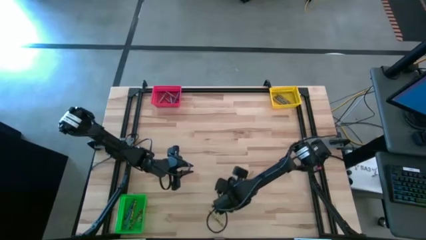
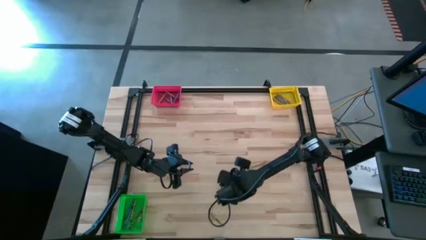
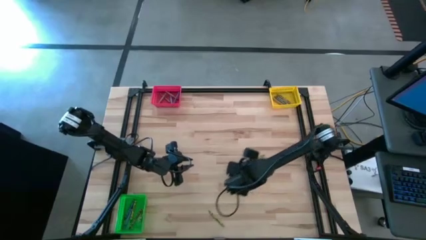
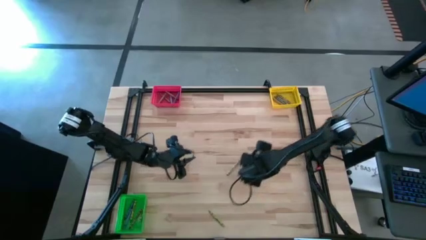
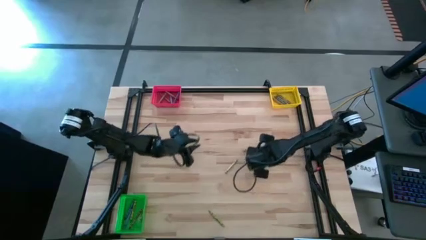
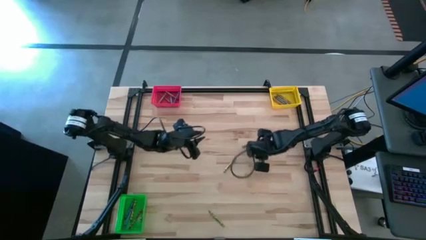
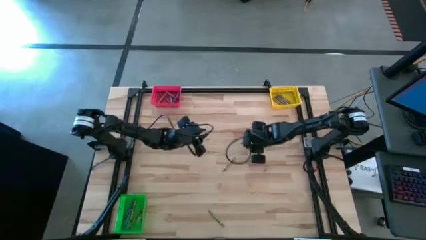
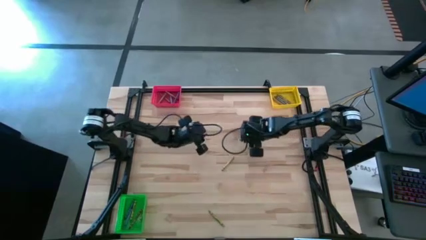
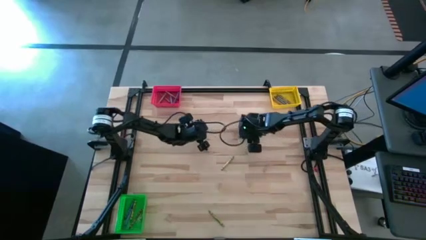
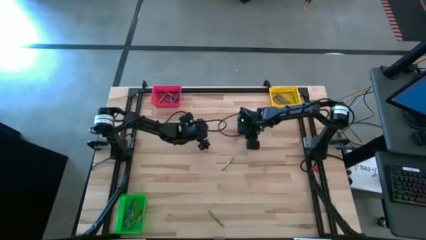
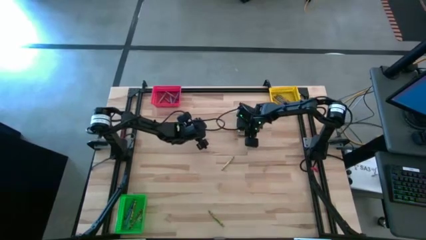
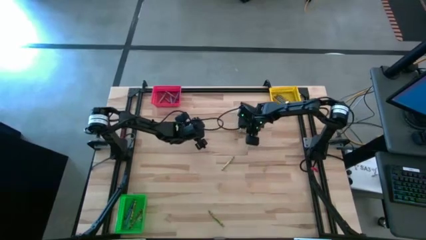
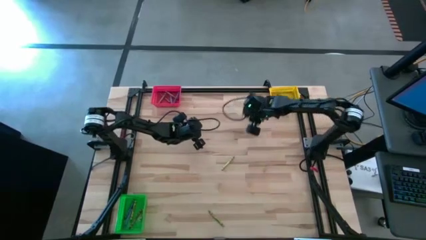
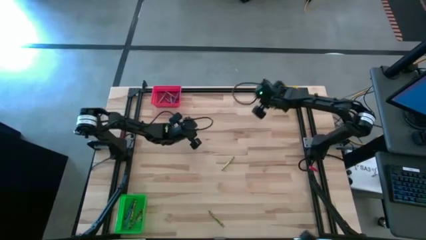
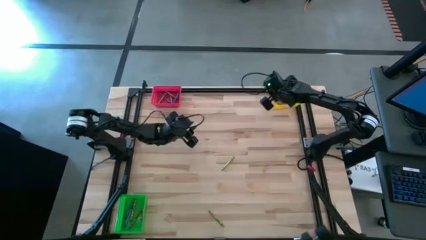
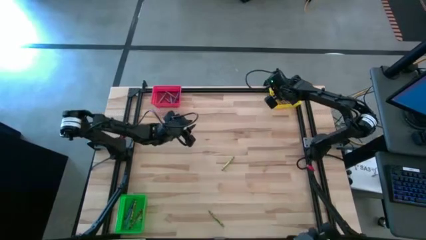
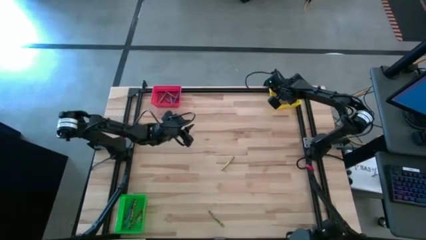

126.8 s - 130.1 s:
Task: Sort crayons
Put the green crayon into the yellow bin

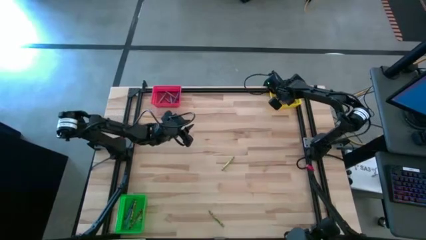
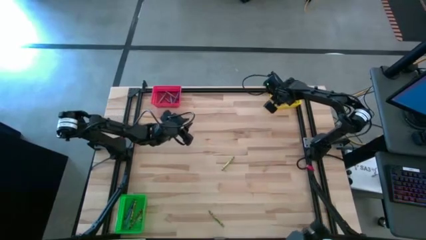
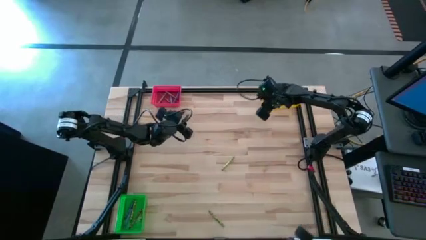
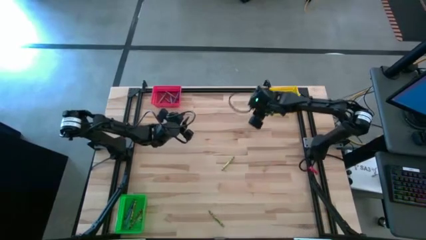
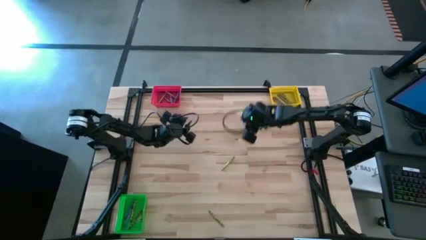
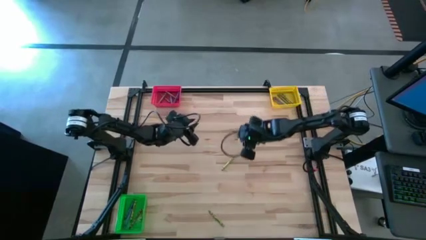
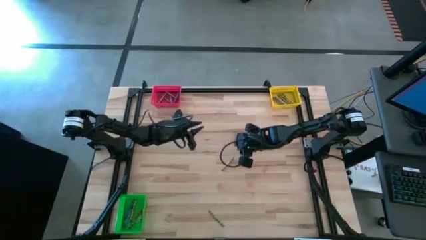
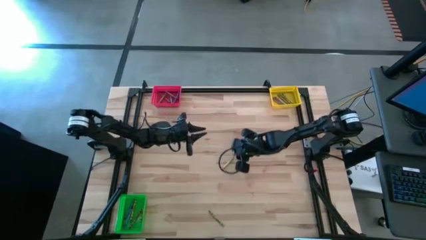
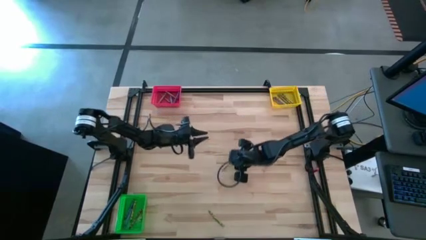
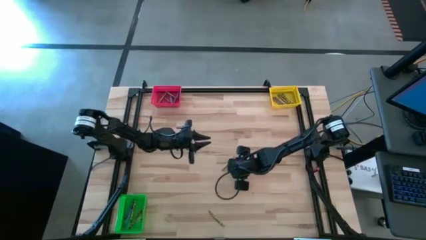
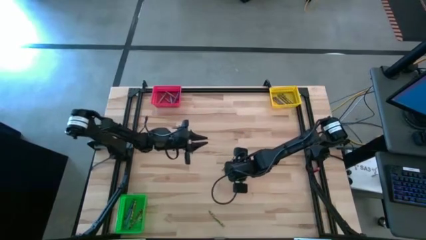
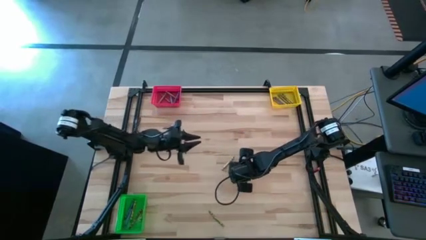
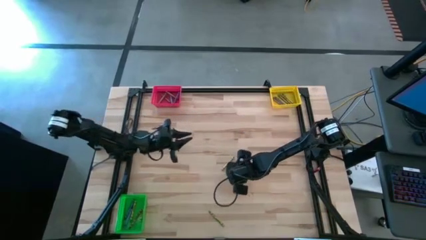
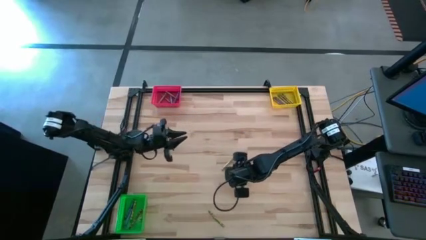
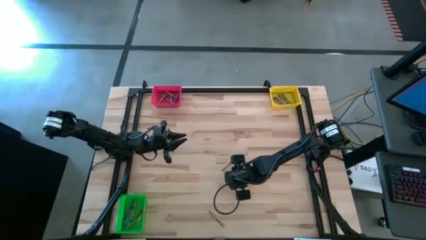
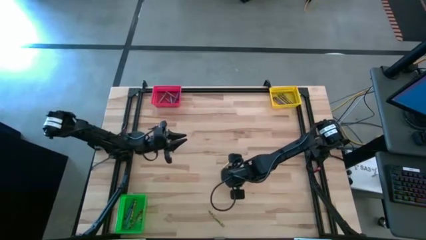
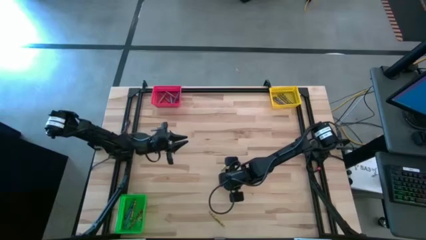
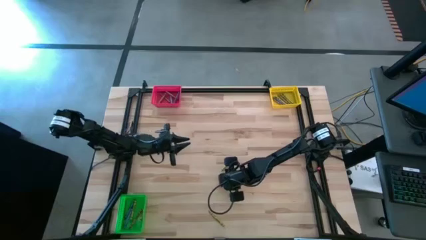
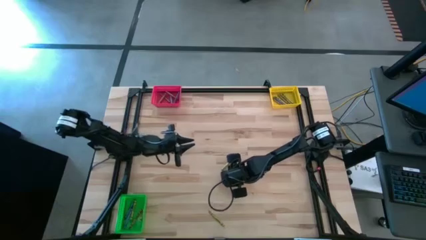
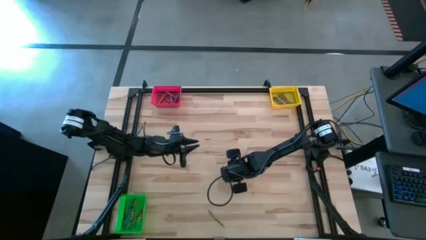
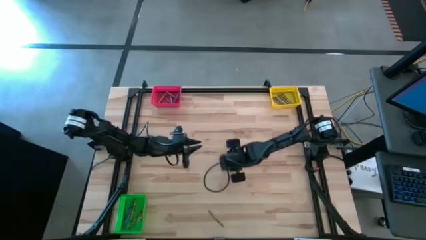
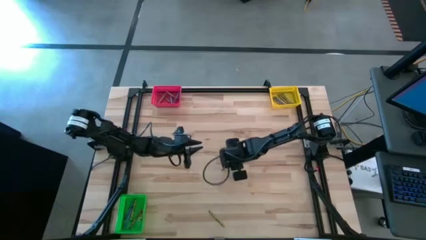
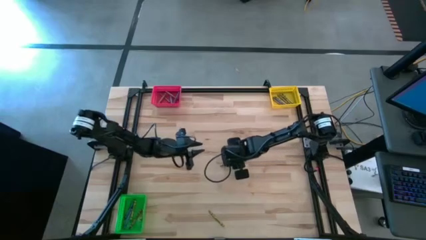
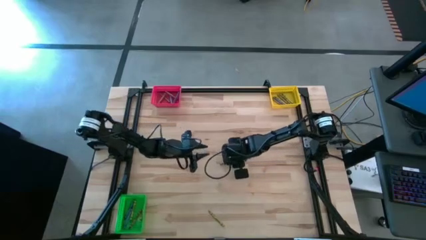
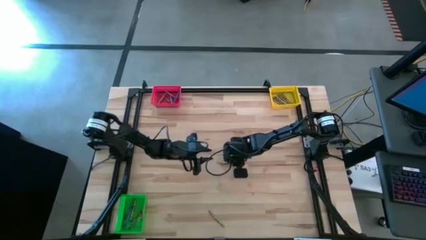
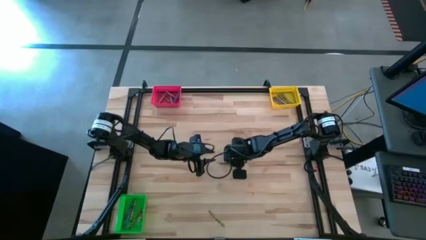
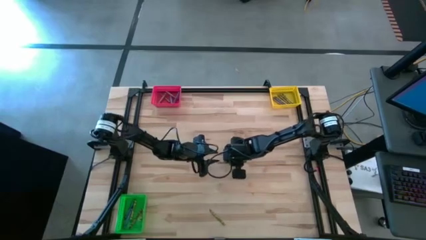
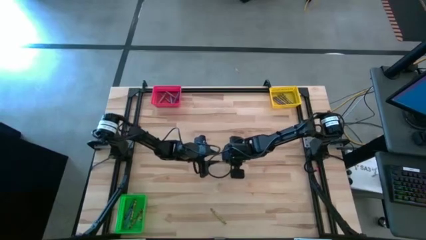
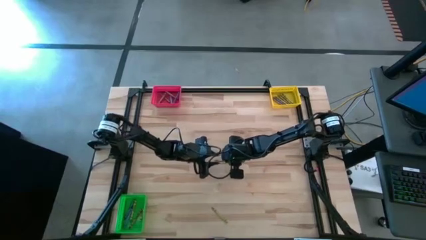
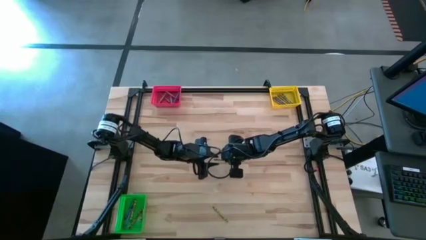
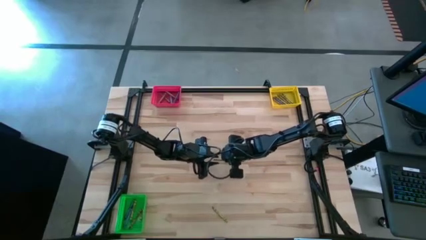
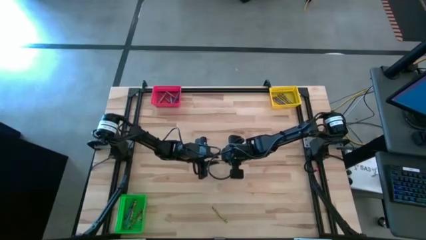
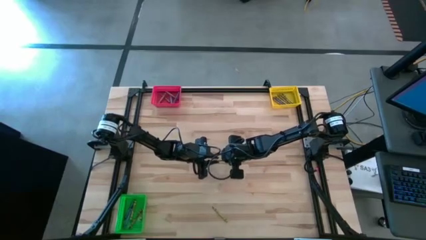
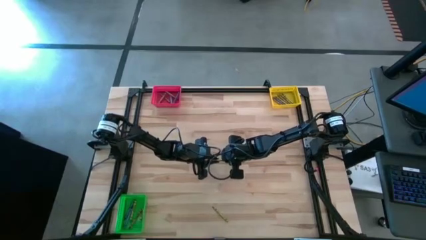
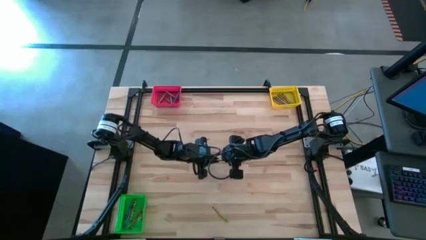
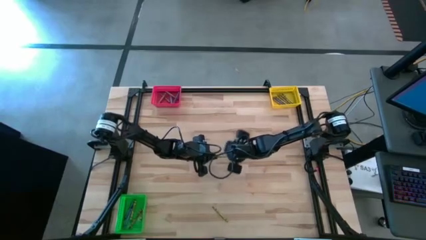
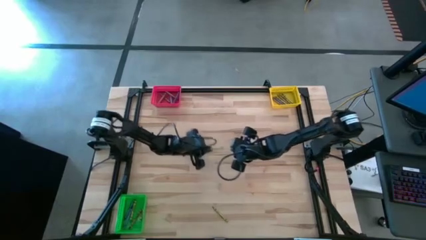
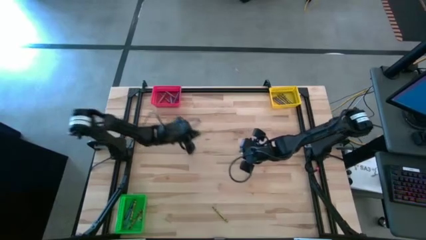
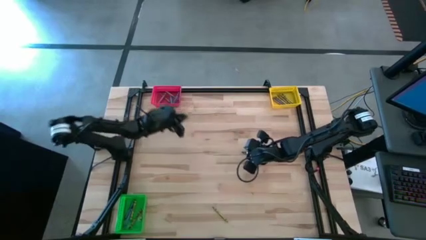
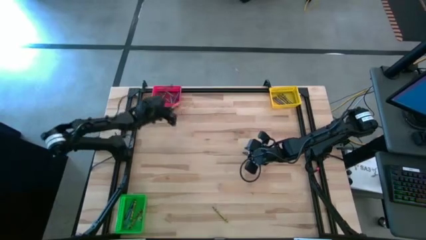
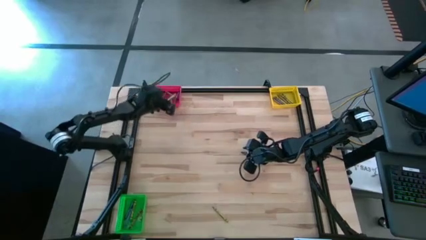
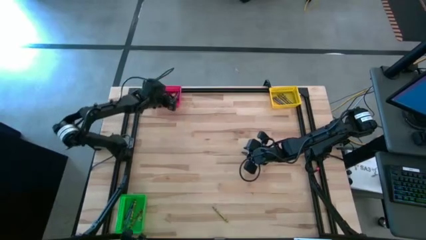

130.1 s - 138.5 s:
Put the green crayon into the red bin

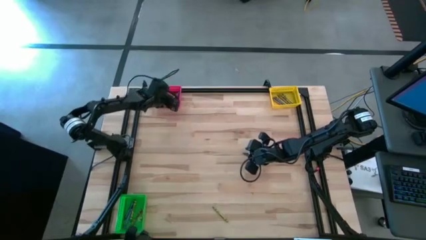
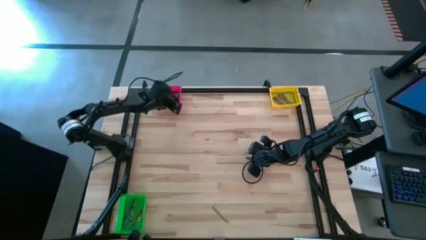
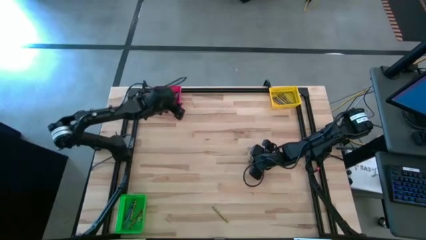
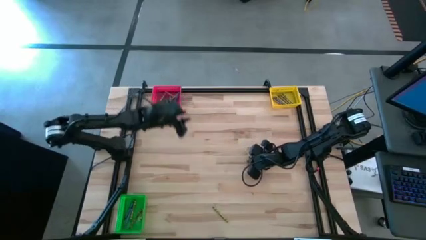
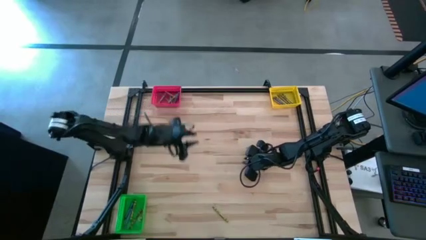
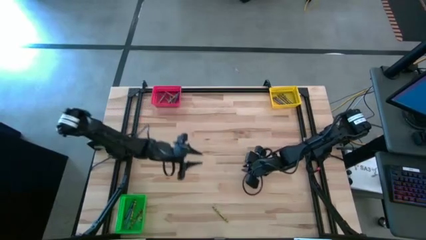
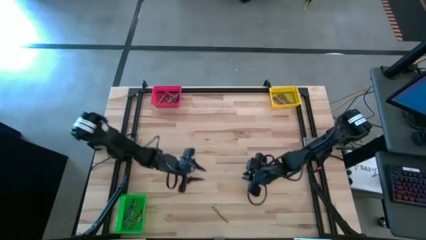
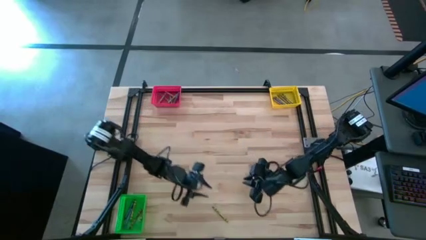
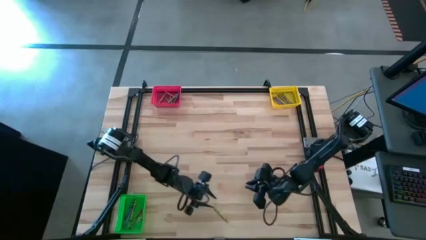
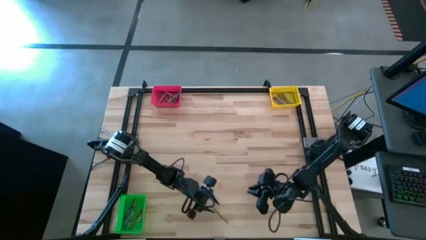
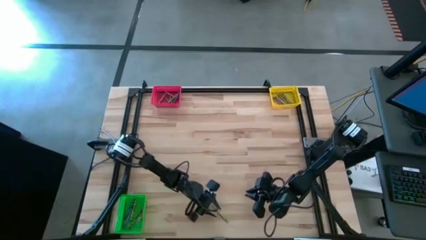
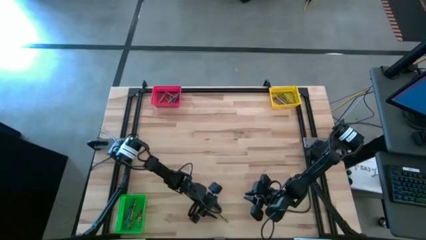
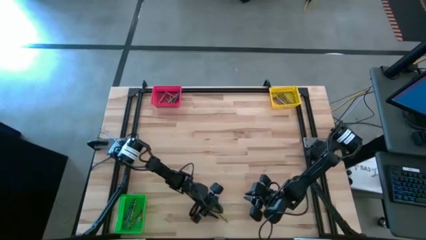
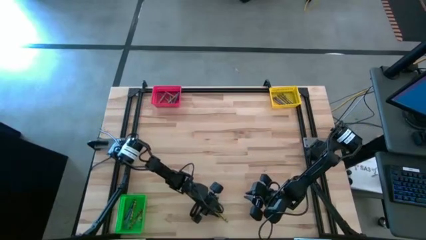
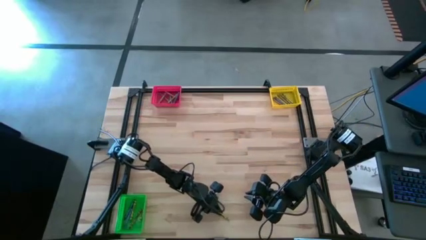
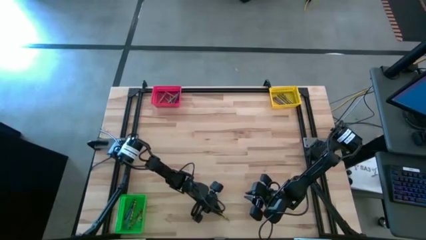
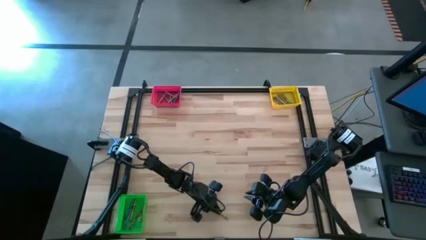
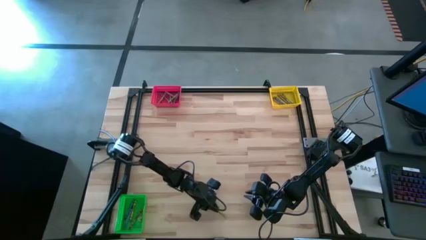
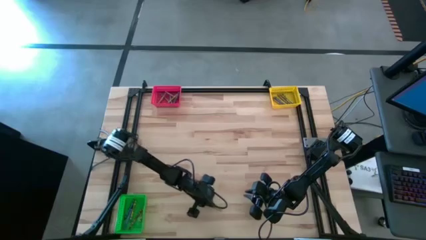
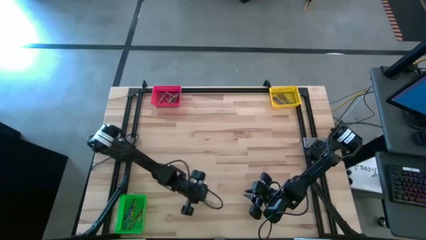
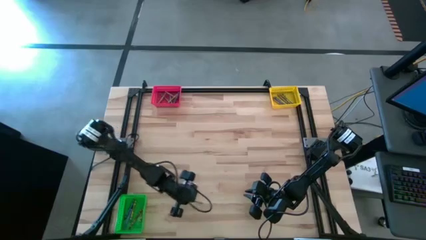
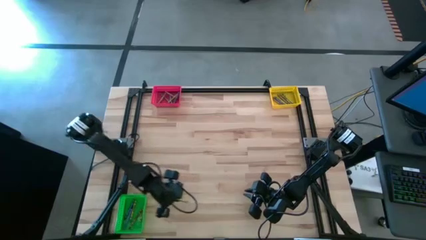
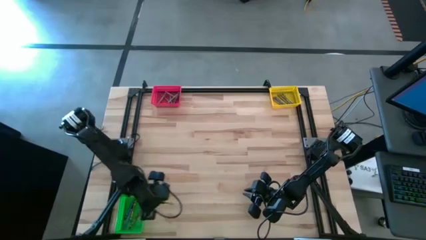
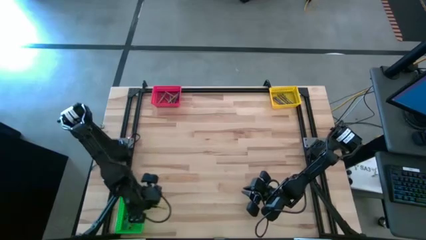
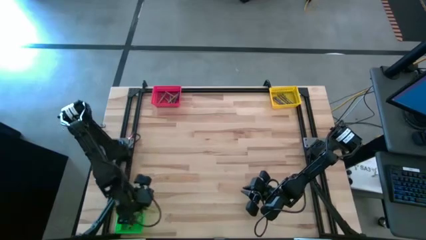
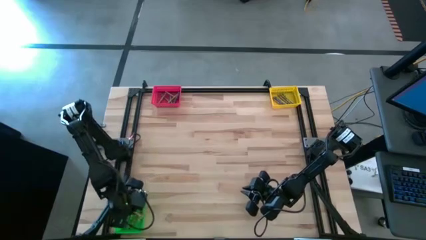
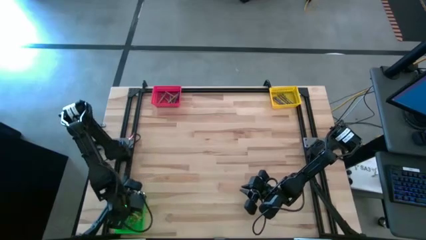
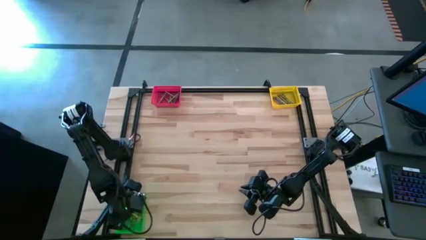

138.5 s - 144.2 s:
Put the green crayon into the green bin
